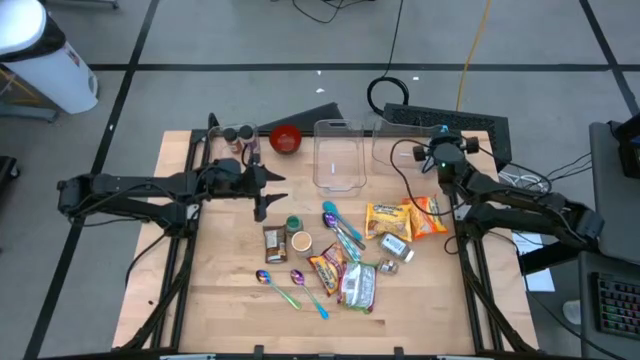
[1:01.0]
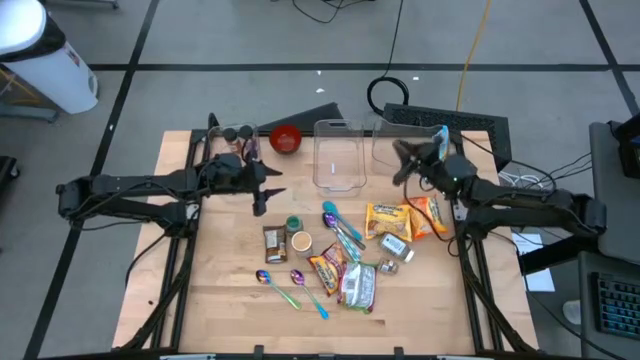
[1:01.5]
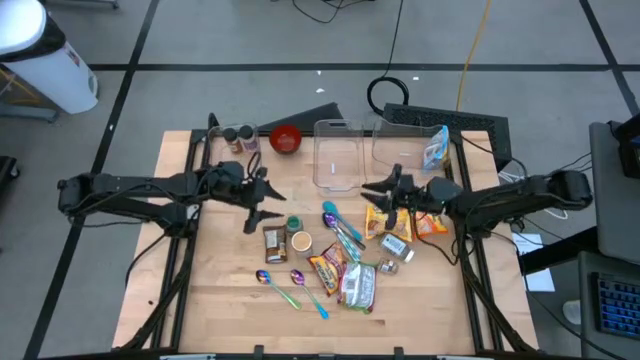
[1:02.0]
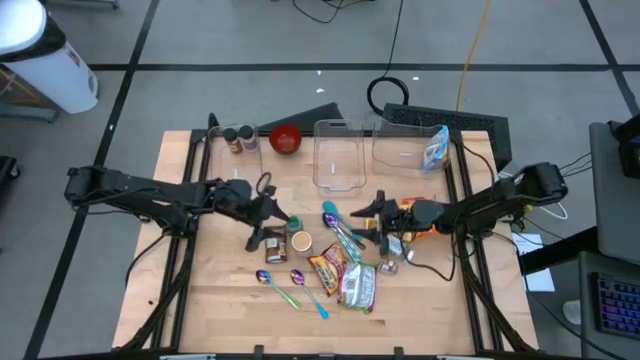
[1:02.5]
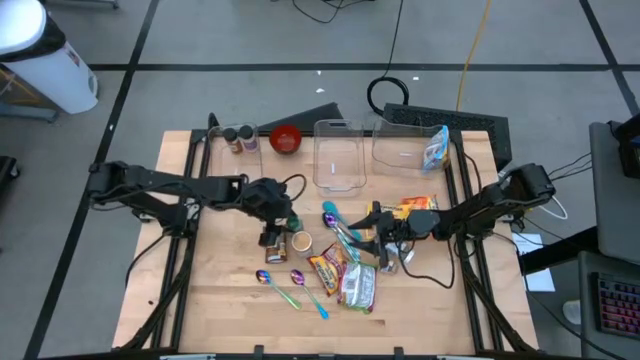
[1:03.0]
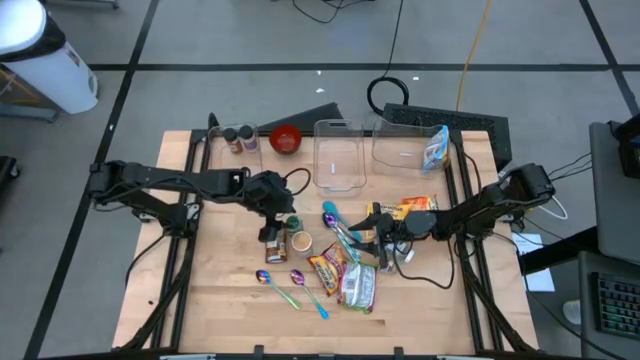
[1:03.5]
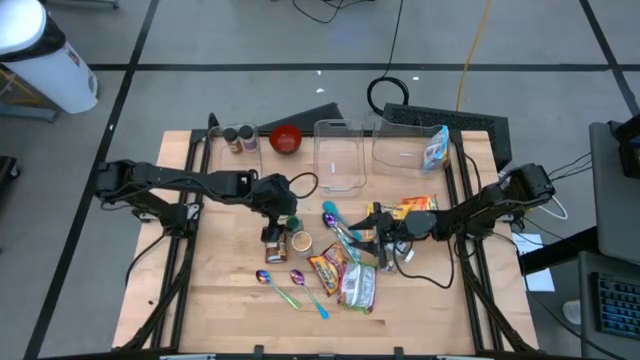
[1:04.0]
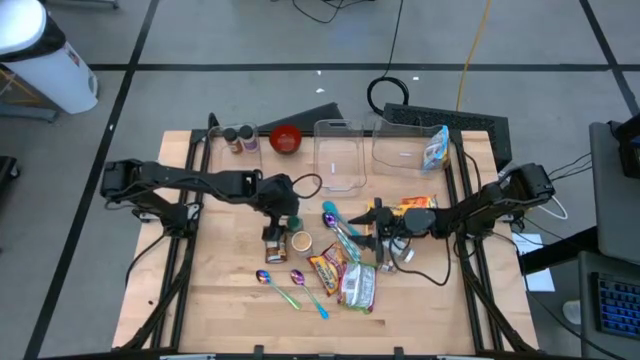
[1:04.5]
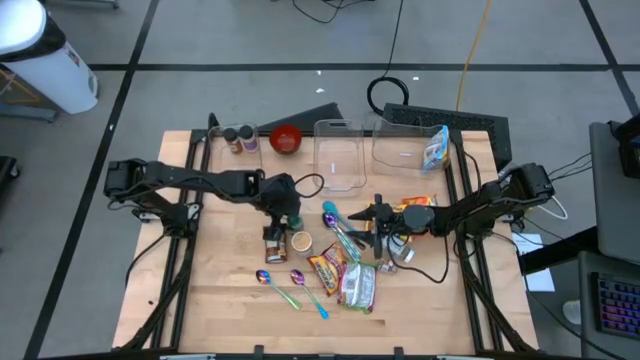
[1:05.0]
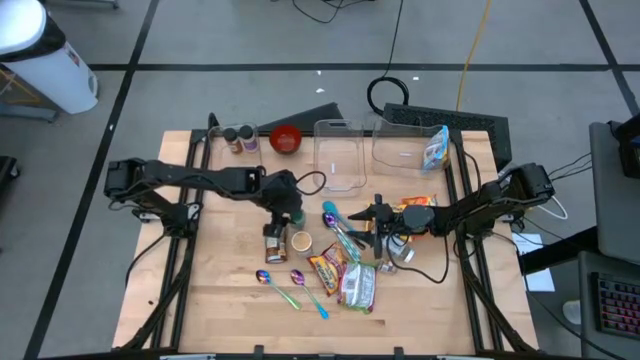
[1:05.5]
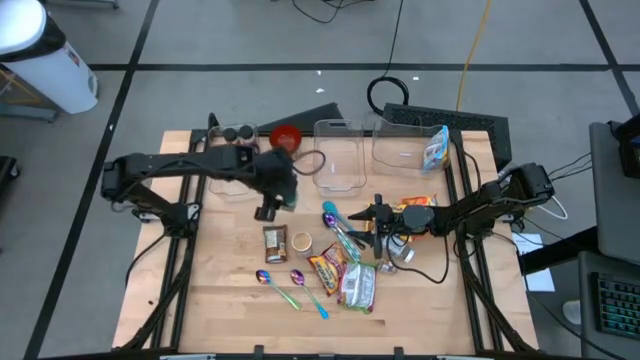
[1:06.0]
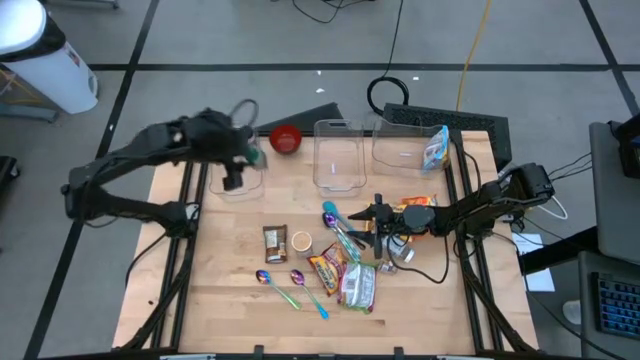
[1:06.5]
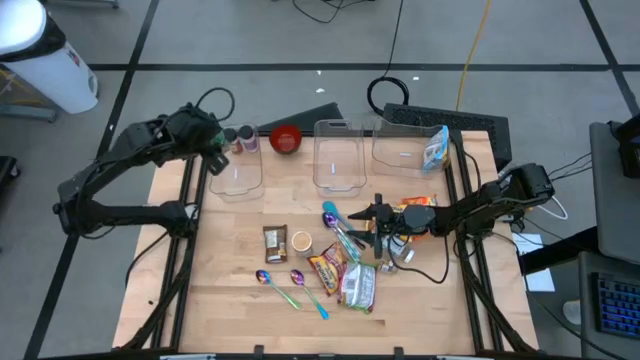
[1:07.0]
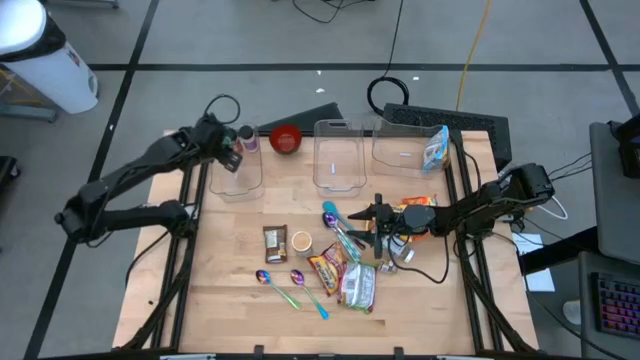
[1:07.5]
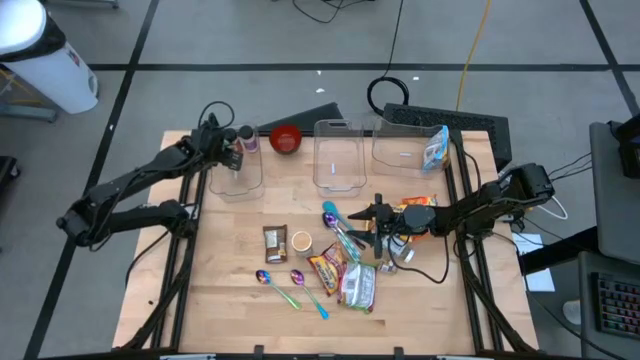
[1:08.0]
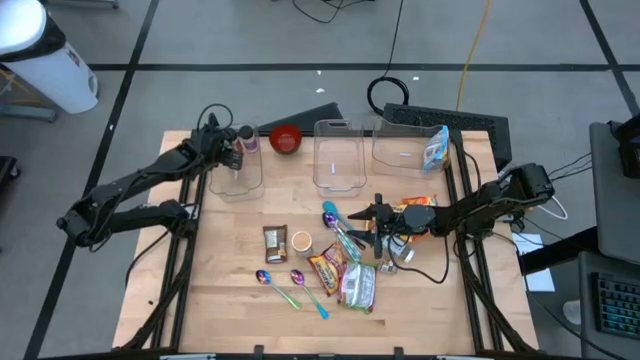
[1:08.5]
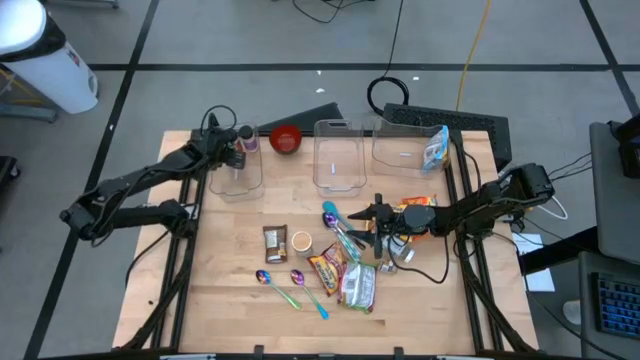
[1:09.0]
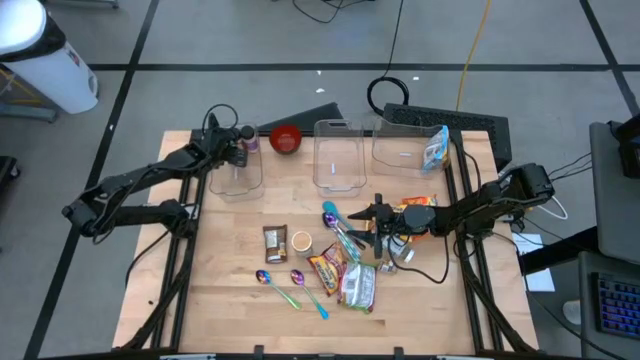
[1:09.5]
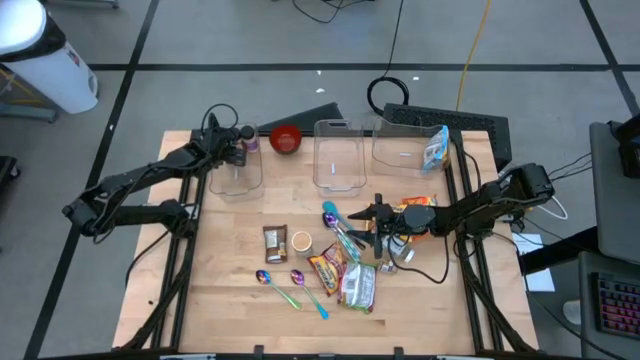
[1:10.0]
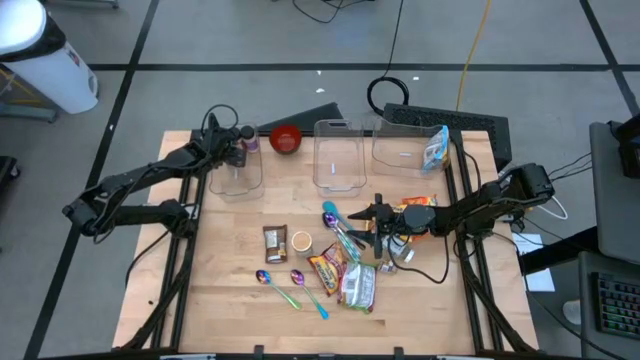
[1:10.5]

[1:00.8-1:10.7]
Task: Pick & Place Food Item
Put the green seasoning bottle into the left transparent bin

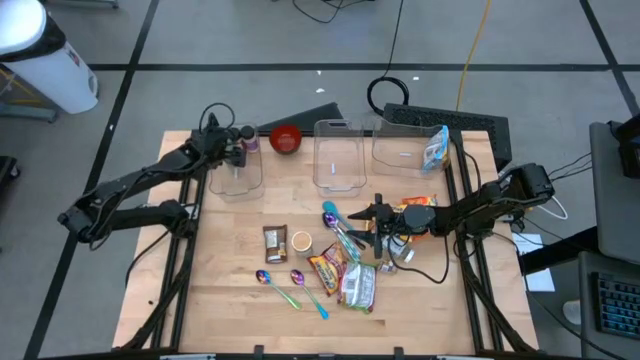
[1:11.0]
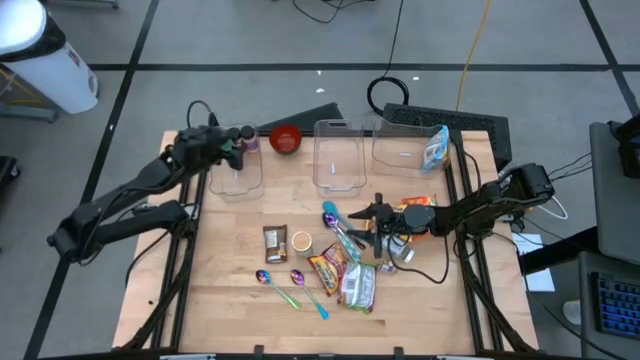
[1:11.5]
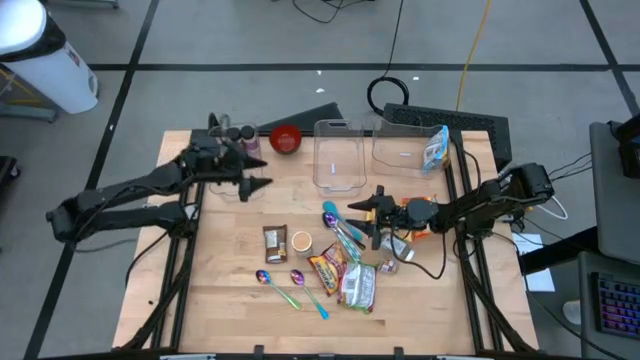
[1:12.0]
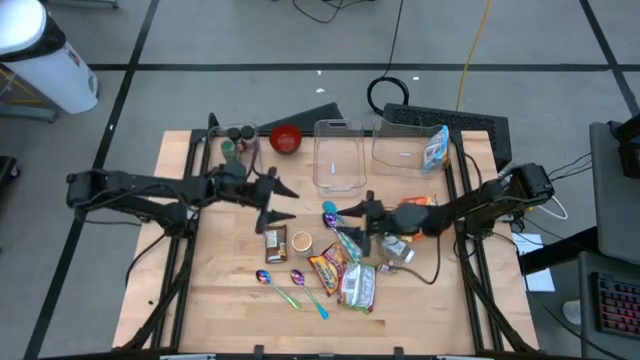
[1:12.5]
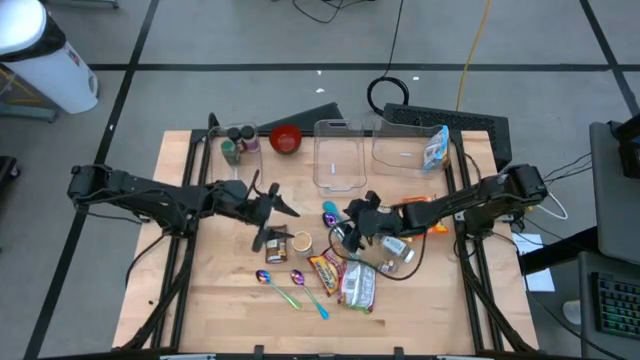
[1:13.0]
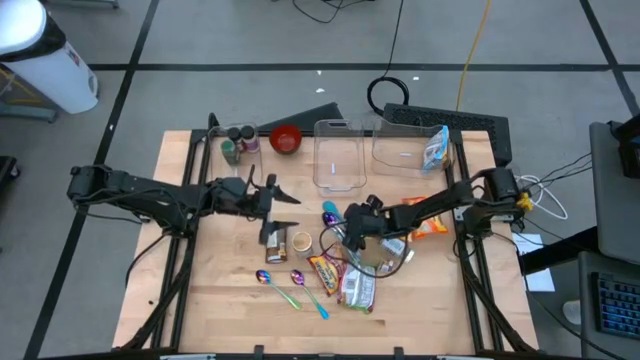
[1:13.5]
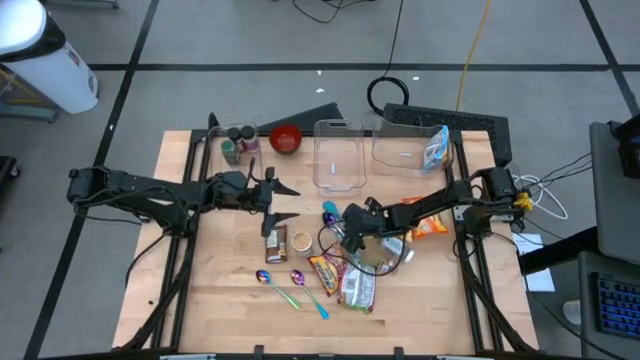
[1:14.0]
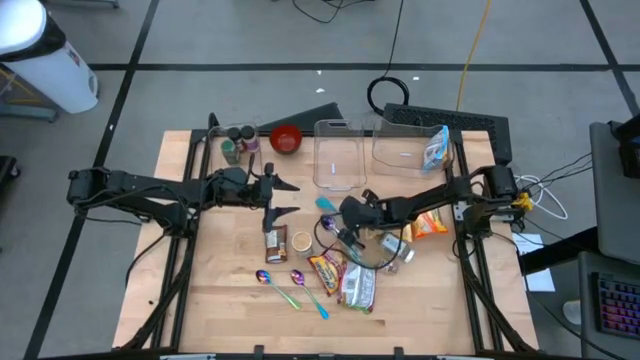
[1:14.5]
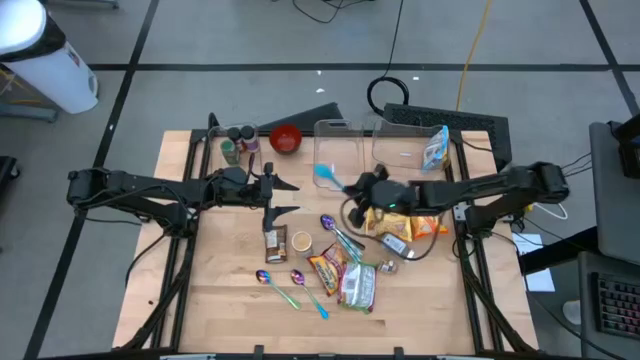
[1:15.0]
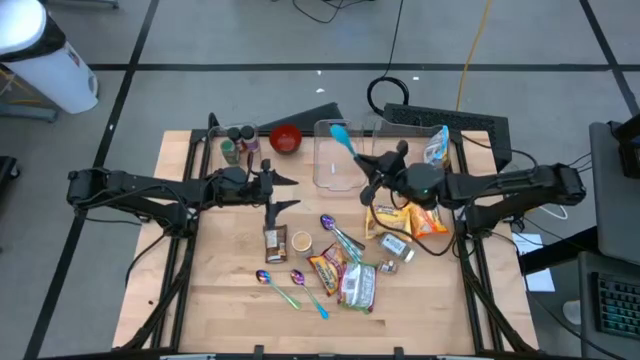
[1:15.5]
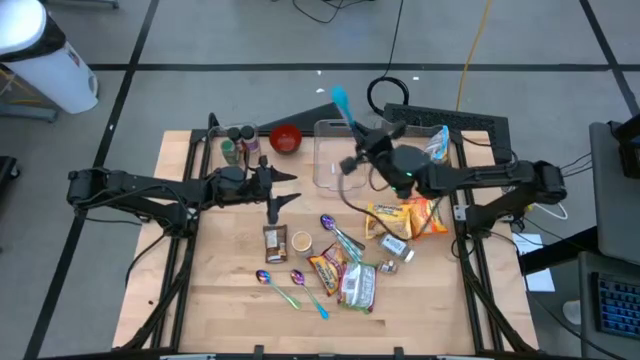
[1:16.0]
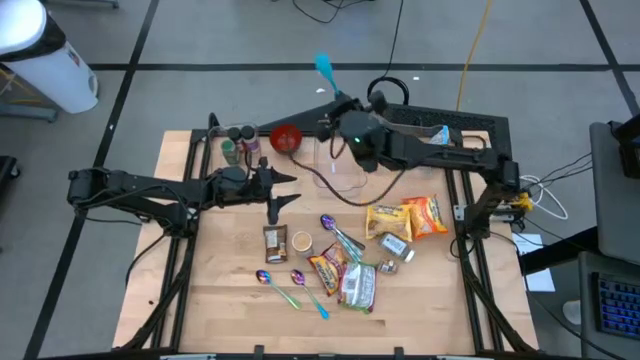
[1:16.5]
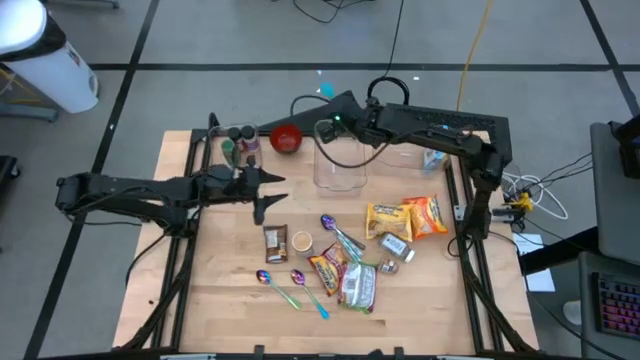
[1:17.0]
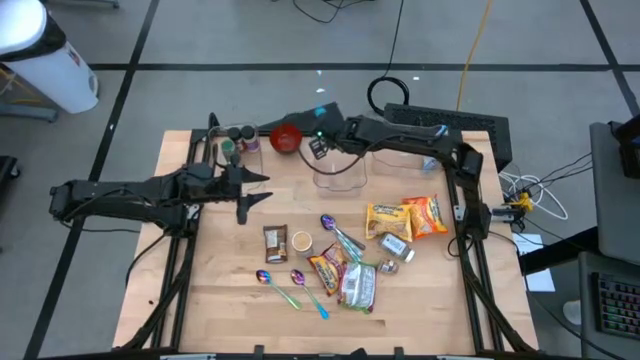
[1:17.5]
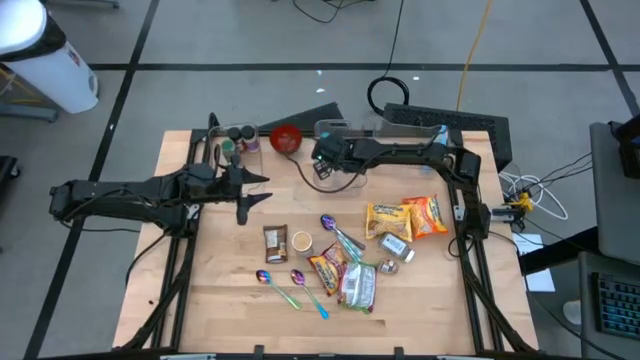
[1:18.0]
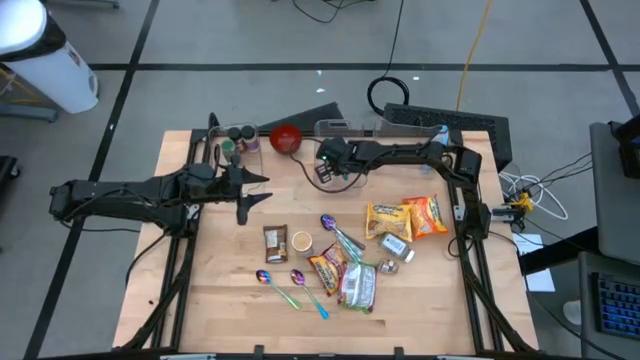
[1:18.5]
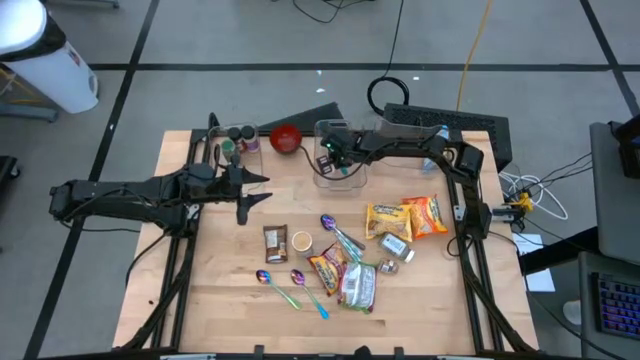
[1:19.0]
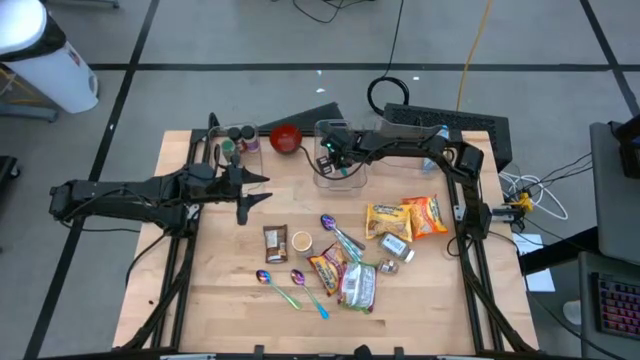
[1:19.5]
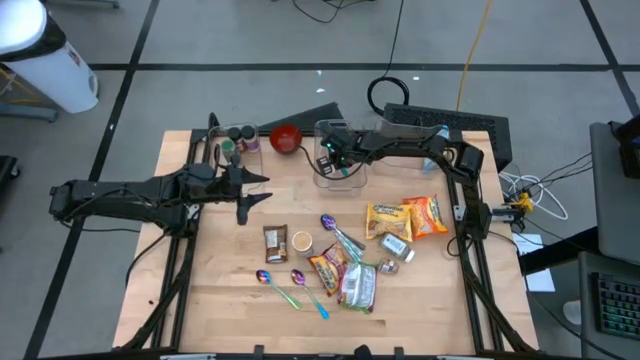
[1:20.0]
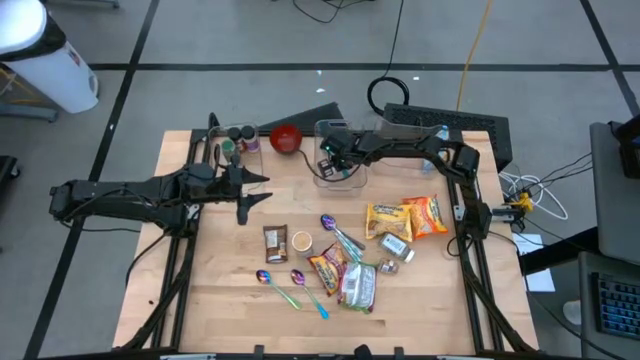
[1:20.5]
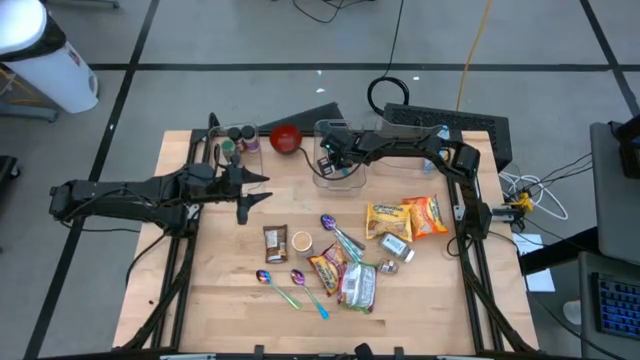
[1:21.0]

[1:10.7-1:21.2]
Put the blue baby spoon into the middle transparent bin

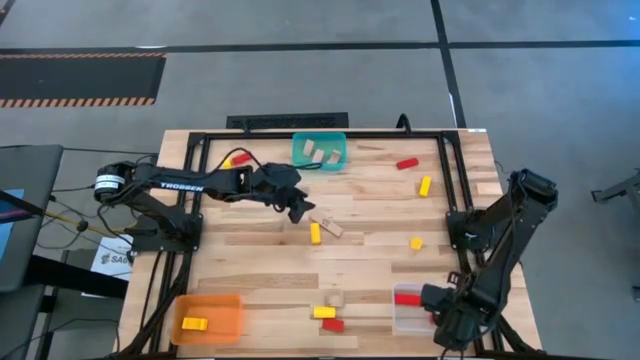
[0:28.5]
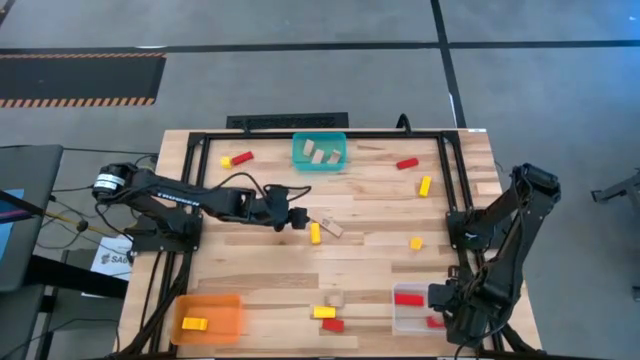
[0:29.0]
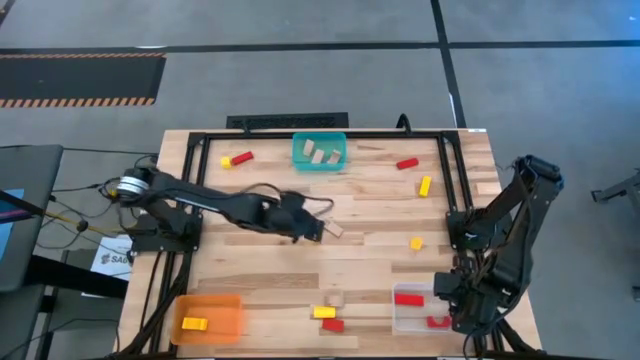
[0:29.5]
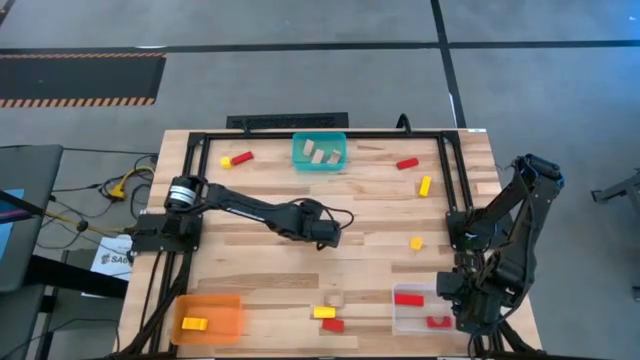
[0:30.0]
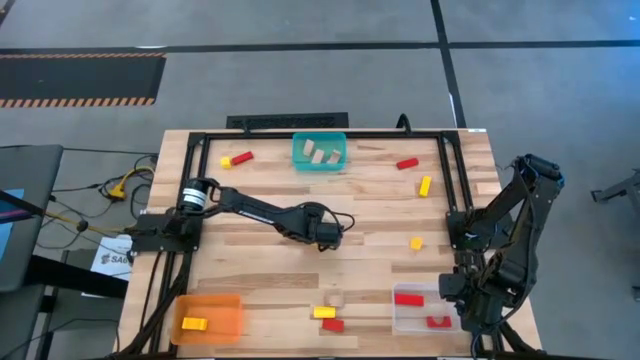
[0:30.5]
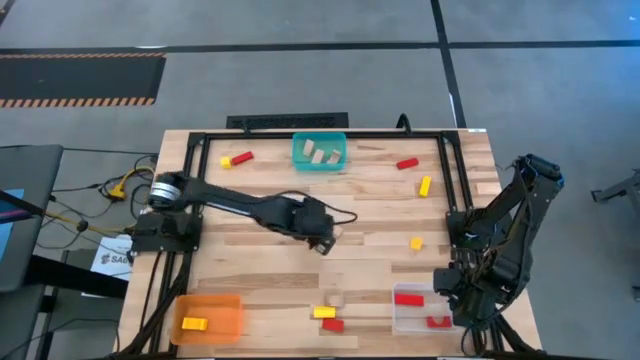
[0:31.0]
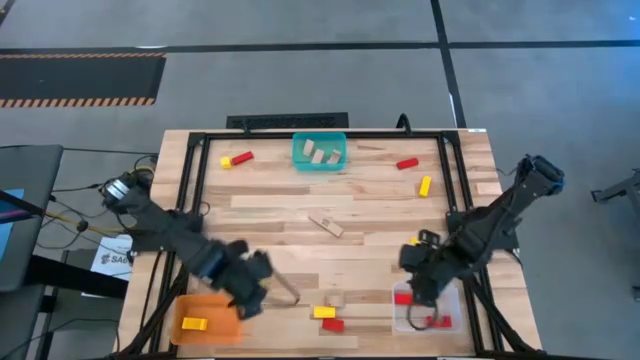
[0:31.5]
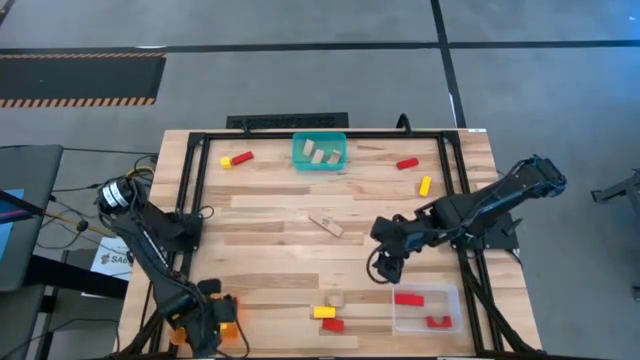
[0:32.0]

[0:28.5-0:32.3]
Task: Sort & place blocks by color
Put the yellow block into the orange bin
